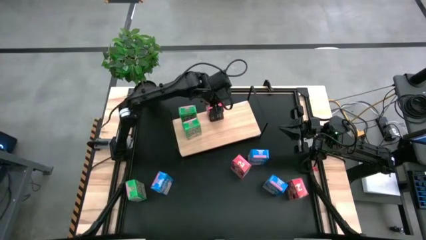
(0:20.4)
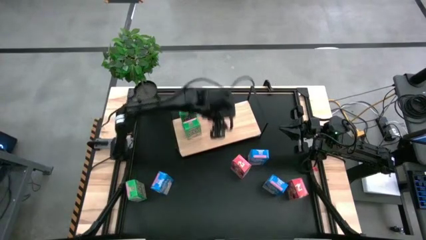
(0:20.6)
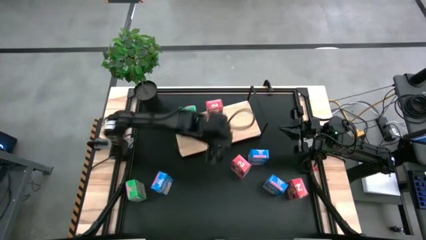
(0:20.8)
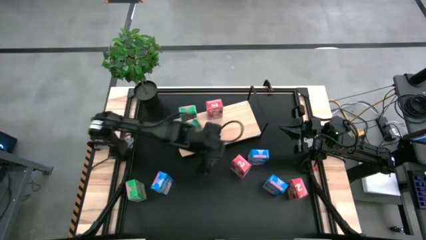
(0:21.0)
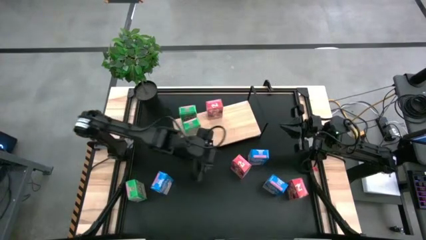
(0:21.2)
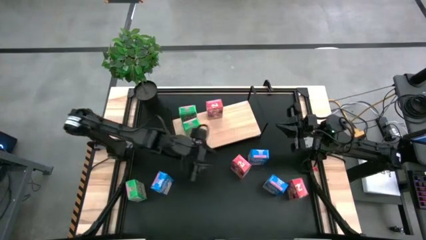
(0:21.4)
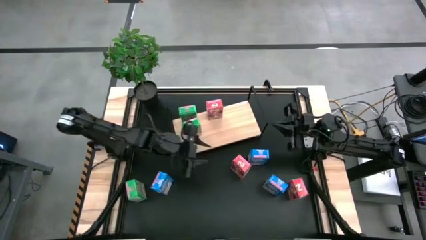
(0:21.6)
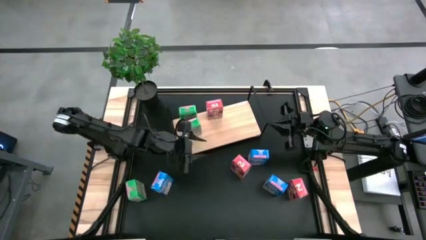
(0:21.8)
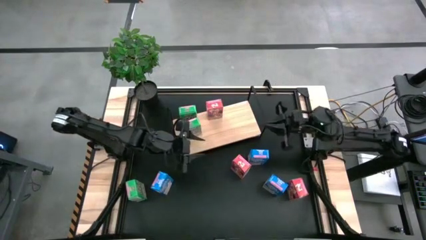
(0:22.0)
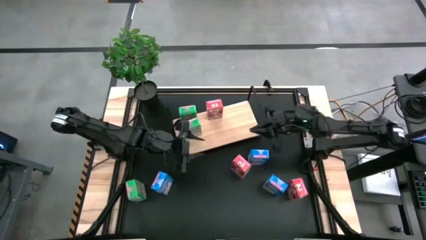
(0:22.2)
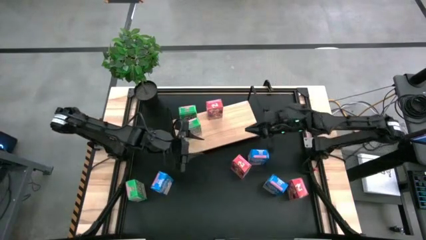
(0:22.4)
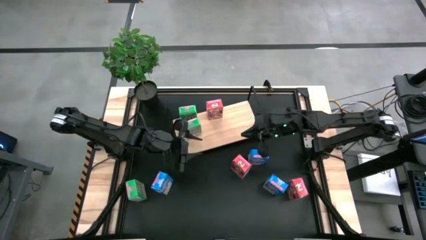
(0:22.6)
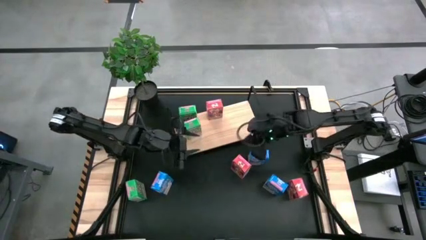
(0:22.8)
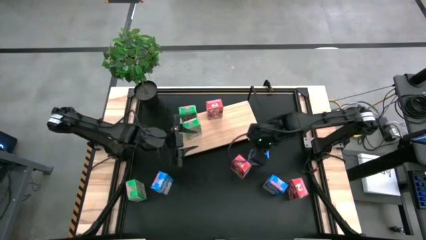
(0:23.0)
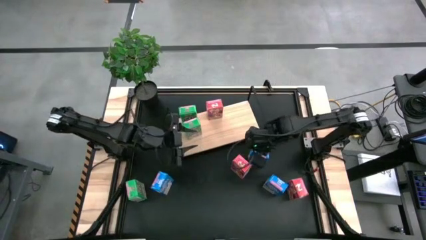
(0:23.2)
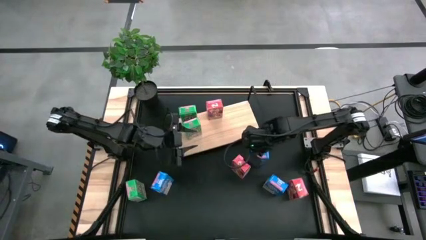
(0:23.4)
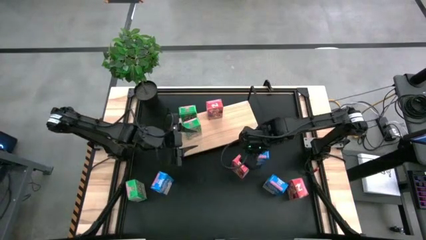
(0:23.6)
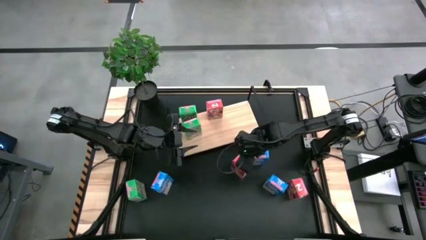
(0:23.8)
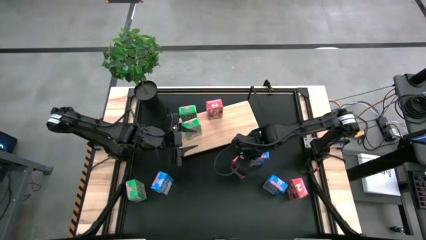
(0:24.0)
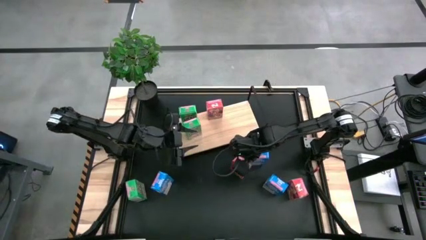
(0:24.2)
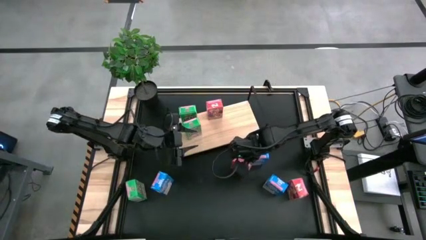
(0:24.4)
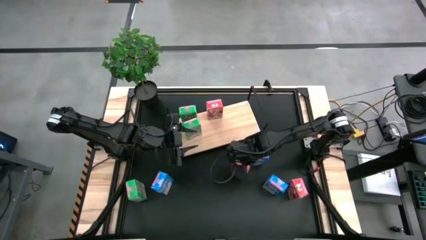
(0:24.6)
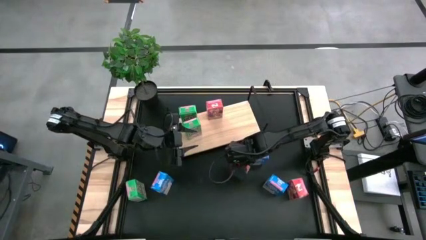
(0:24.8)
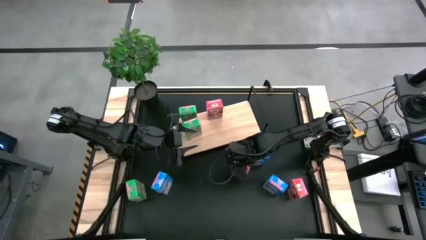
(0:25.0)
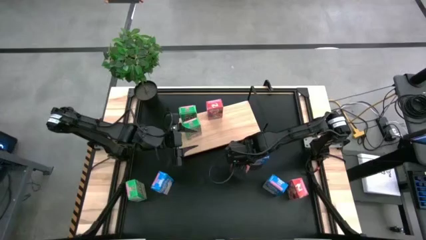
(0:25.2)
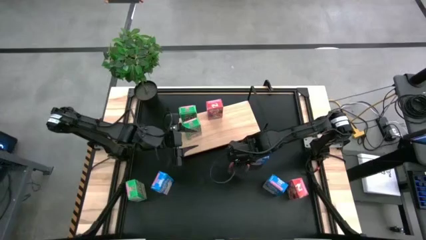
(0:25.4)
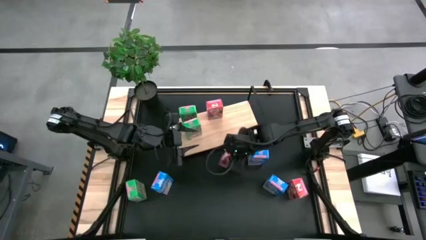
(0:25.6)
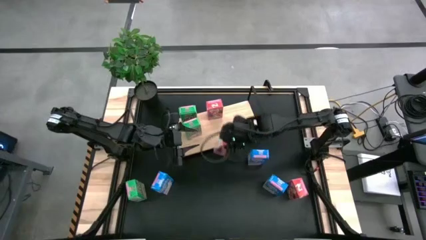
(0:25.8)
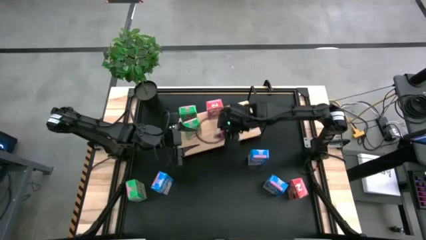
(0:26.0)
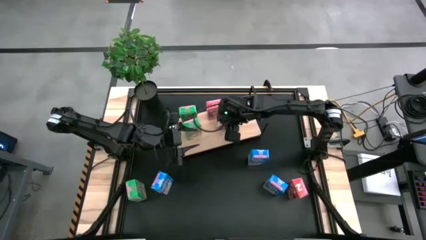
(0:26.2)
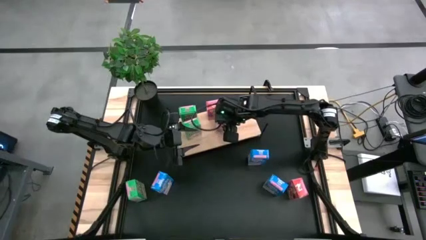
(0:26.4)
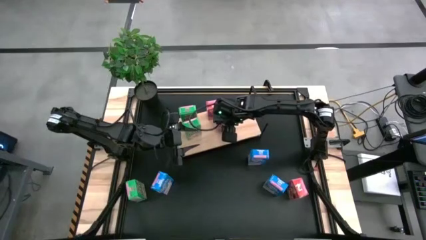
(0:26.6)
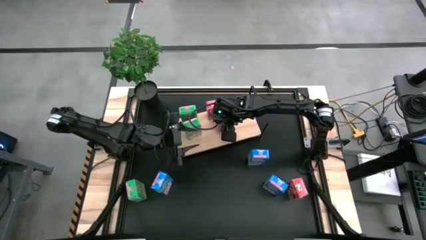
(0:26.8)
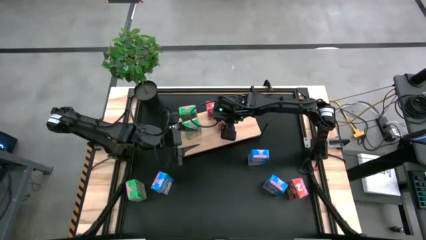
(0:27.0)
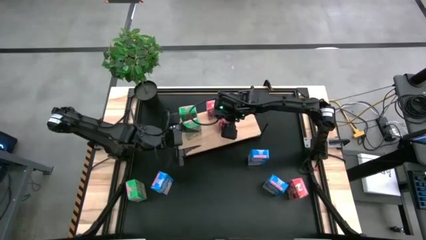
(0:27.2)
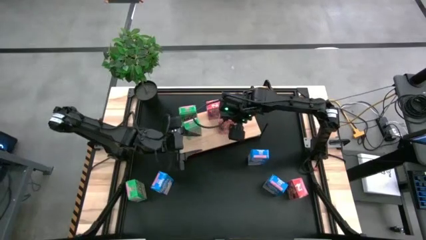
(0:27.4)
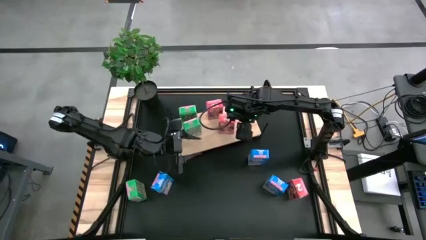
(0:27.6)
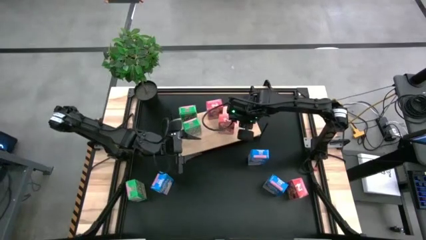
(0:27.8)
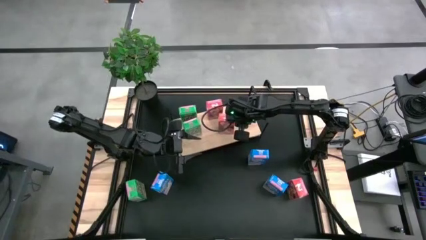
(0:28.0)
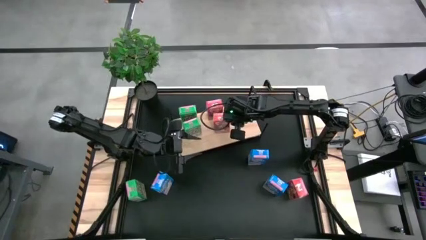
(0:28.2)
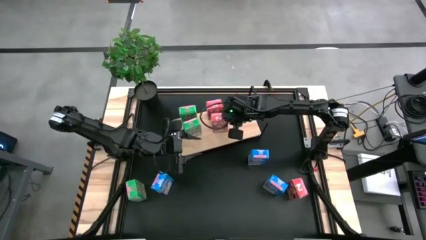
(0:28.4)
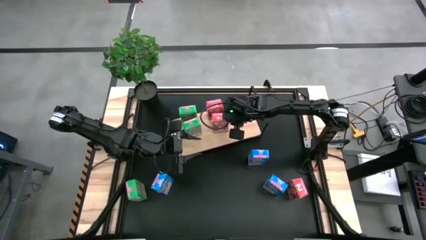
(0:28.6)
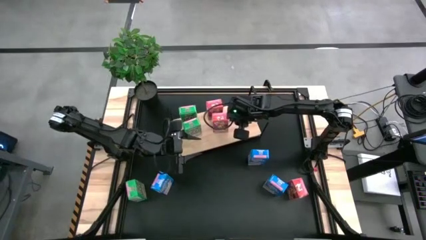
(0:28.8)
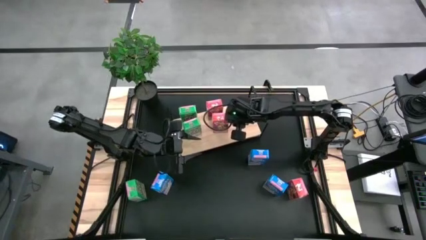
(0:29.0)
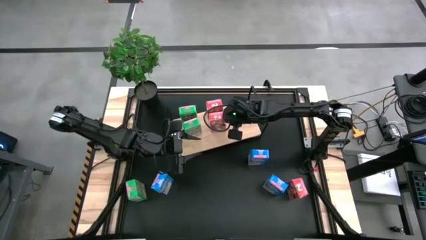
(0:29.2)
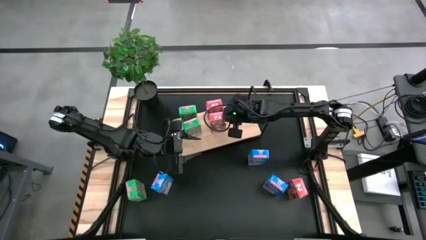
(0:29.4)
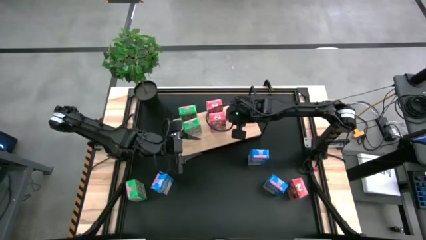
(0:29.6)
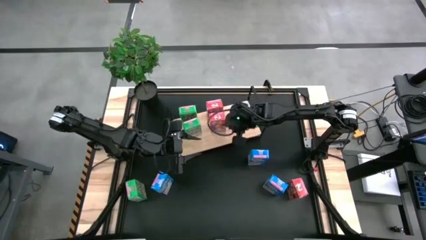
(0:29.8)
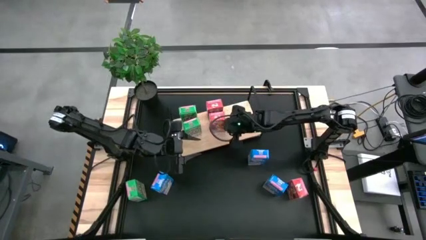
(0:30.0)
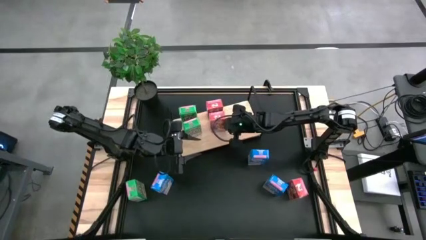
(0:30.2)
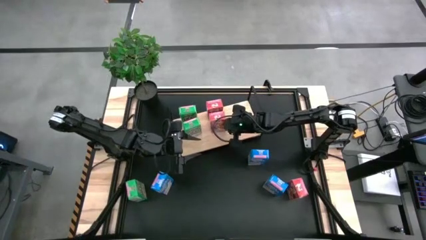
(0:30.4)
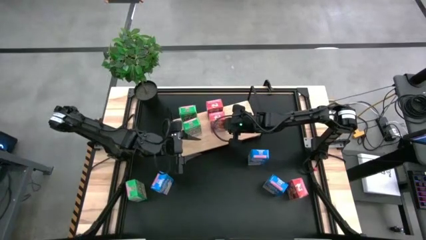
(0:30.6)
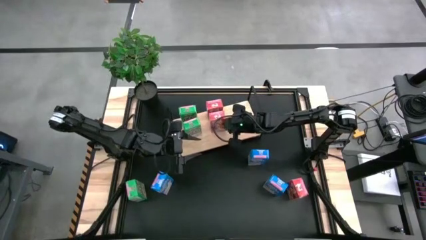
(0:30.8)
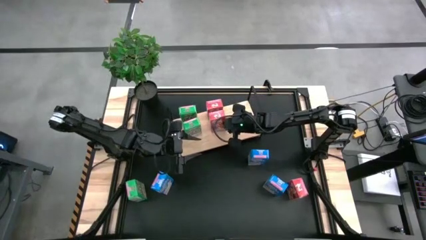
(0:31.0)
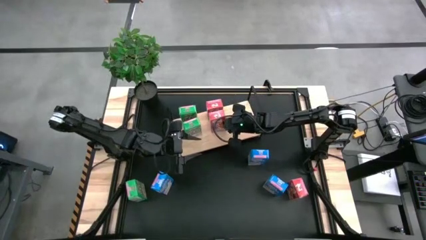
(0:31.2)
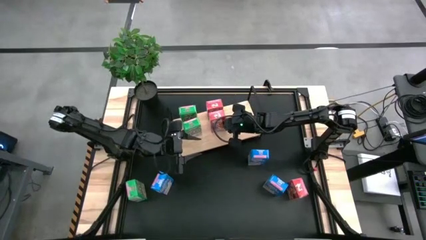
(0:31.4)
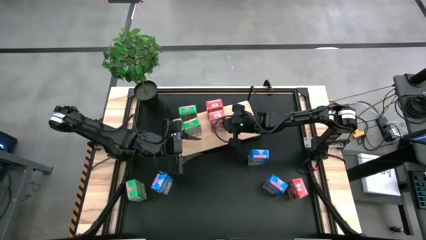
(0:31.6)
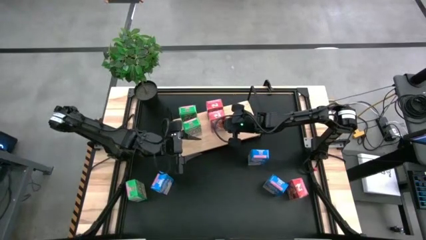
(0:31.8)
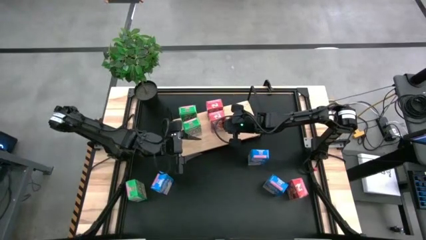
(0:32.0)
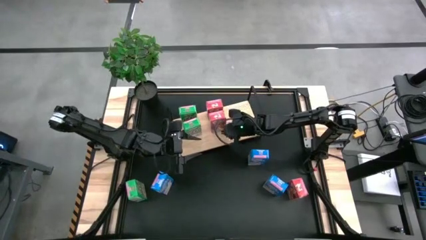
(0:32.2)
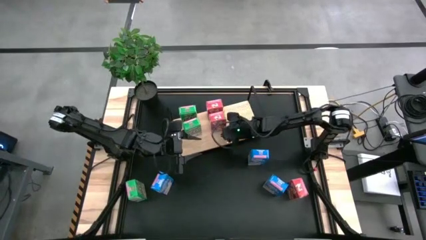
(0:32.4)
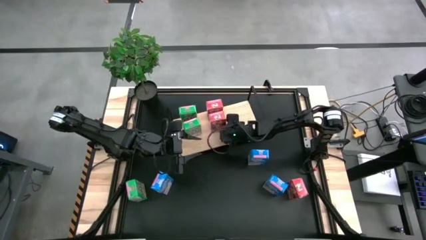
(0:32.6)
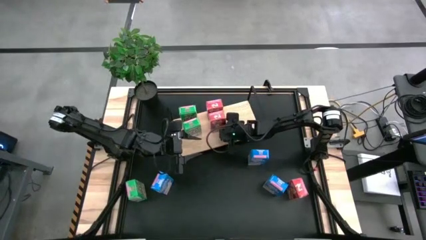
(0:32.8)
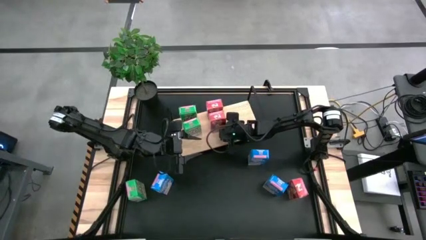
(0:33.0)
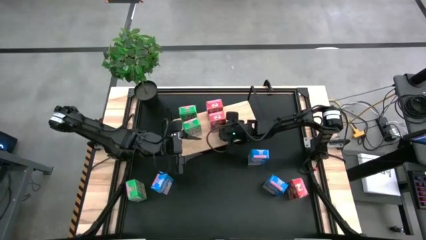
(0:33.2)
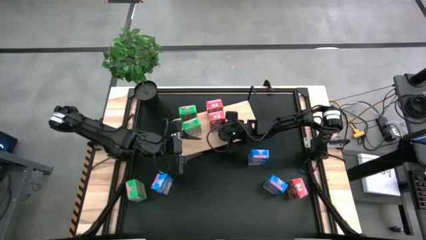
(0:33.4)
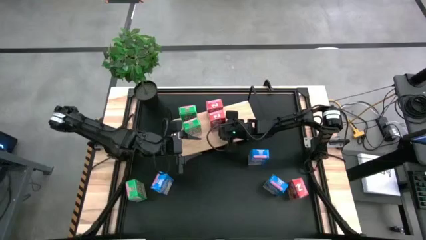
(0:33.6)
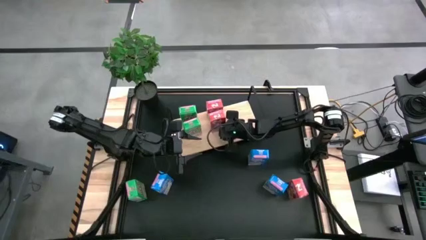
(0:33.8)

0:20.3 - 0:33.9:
Task: Stack cereal on shelf
Align the left red cereal box with the other red cereal box on the shelf

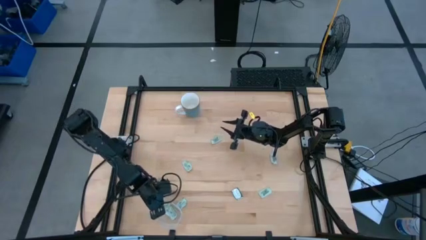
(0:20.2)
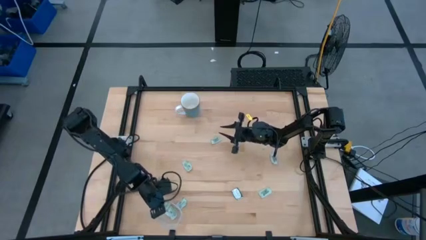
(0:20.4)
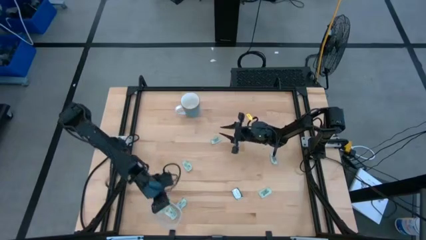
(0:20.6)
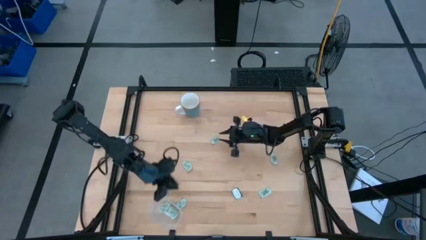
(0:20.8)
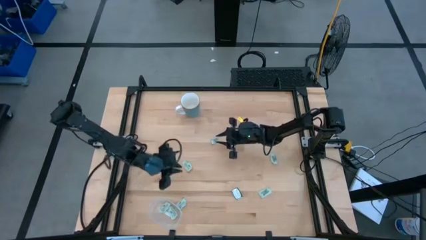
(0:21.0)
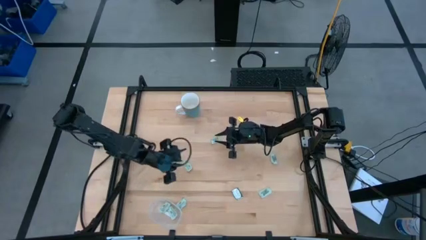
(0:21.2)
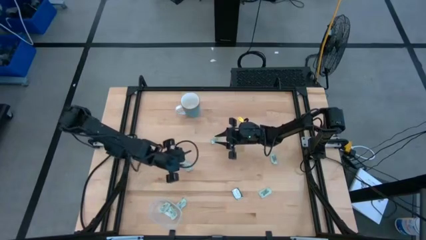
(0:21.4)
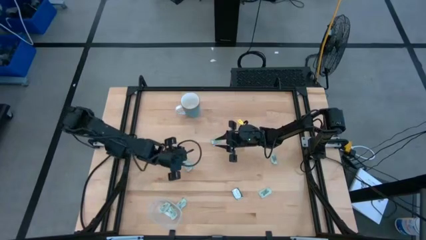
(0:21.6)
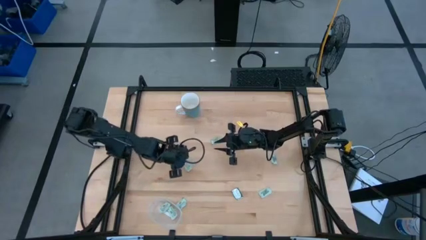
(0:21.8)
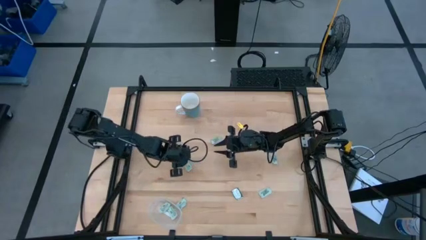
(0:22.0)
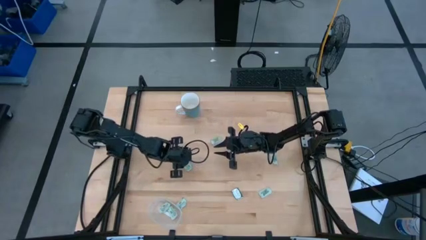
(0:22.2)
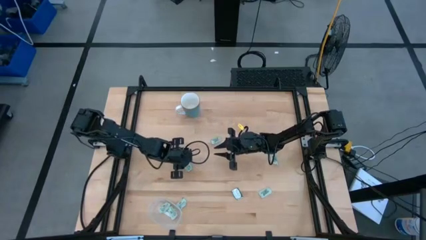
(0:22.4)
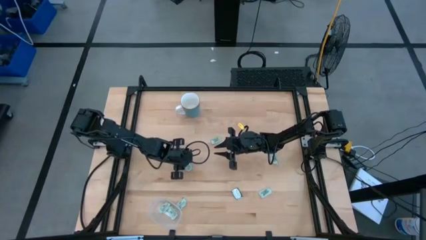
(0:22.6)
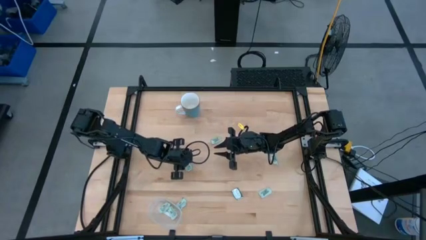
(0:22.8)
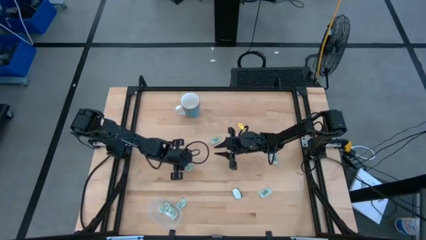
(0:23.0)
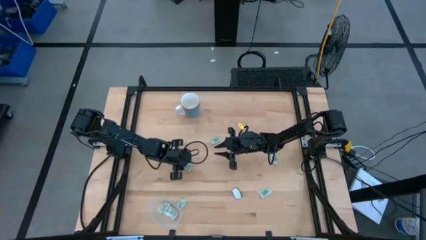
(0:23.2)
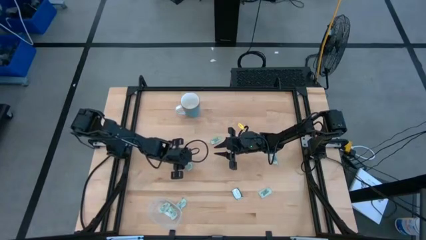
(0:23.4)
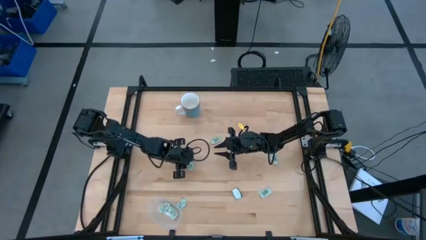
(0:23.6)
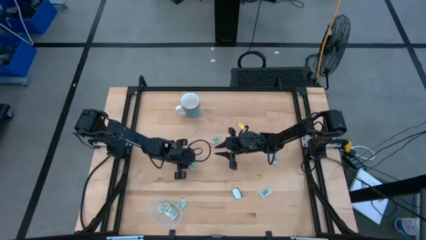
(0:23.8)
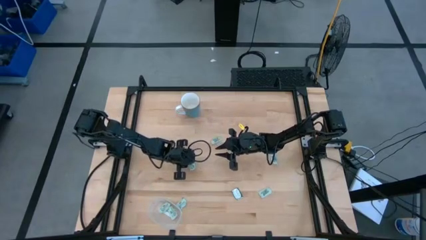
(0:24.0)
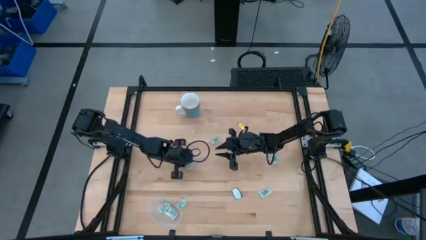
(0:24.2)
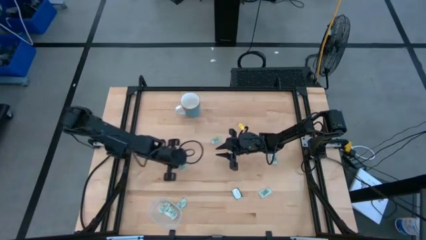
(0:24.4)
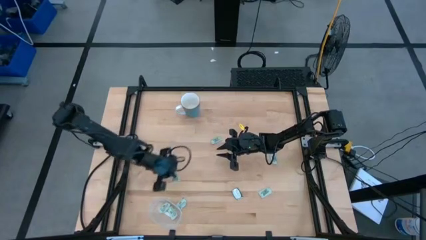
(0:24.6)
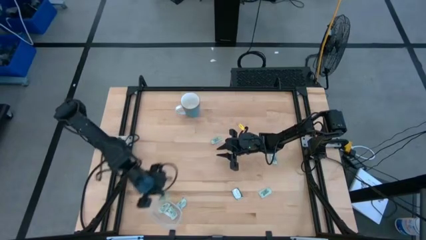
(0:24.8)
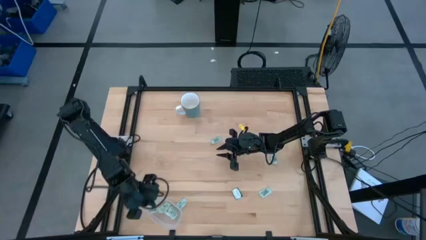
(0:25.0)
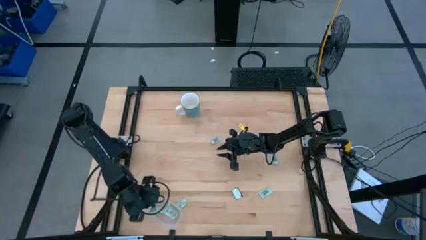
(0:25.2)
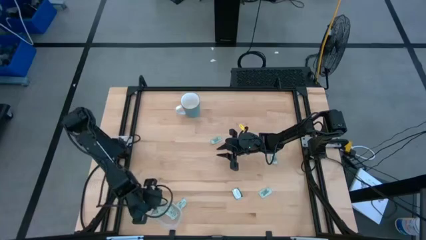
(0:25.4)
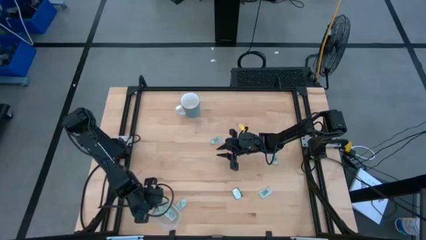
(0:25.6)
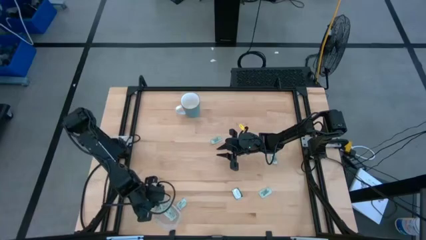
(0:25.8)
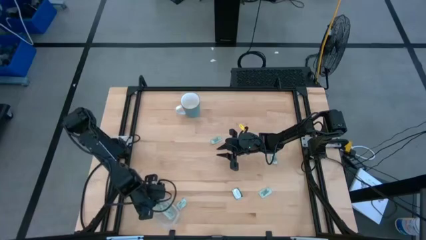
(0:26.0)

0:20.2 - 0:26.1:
Task: Pick and place Stevia / Truvia into bins
Put the stevia packet into the transparent container
